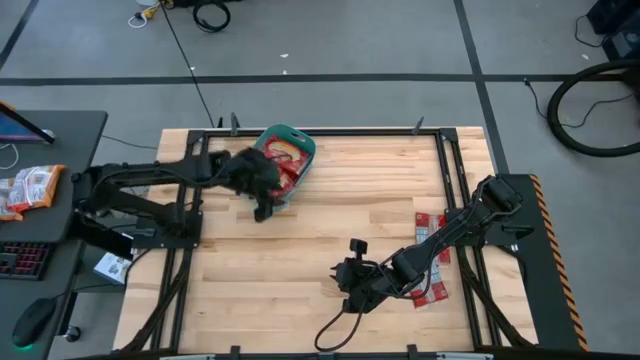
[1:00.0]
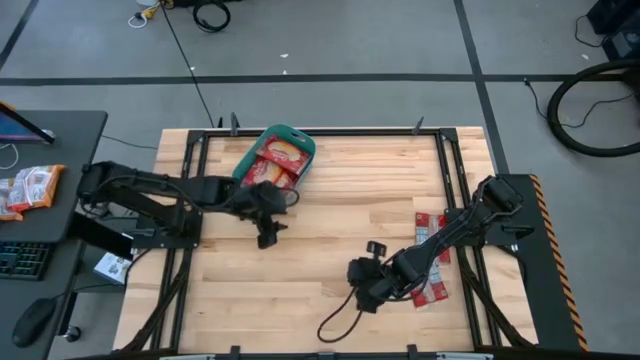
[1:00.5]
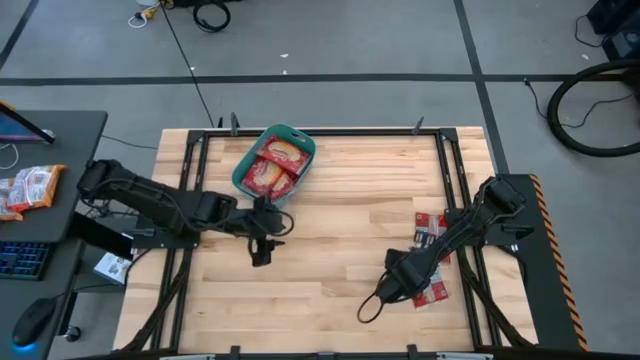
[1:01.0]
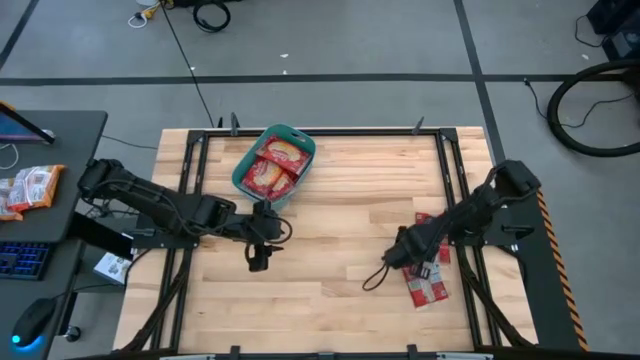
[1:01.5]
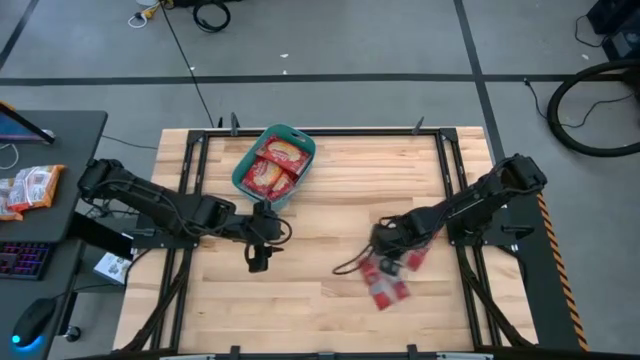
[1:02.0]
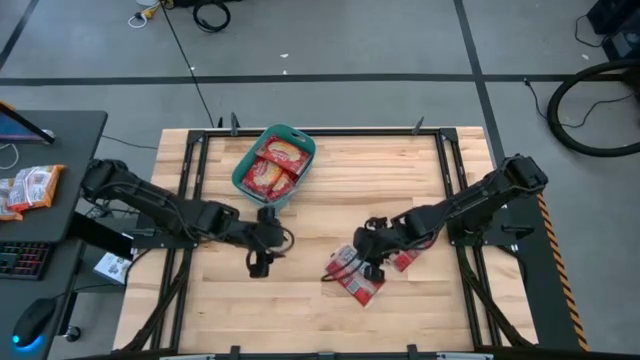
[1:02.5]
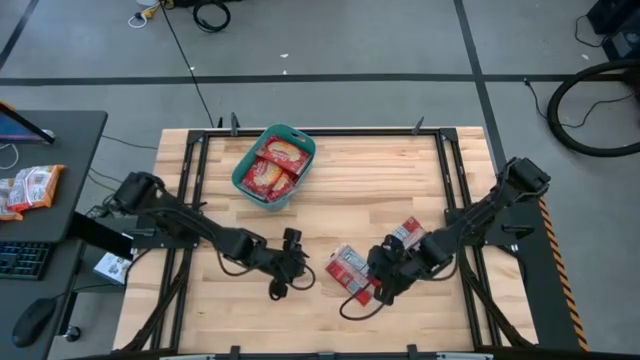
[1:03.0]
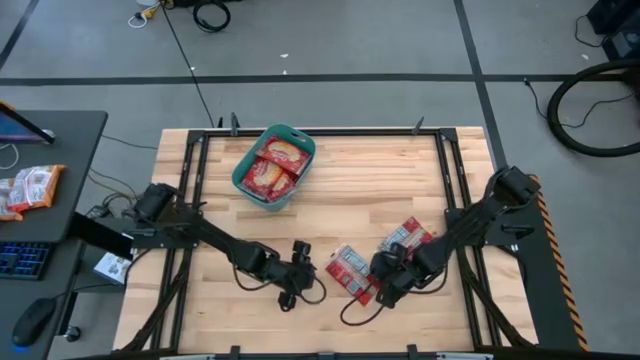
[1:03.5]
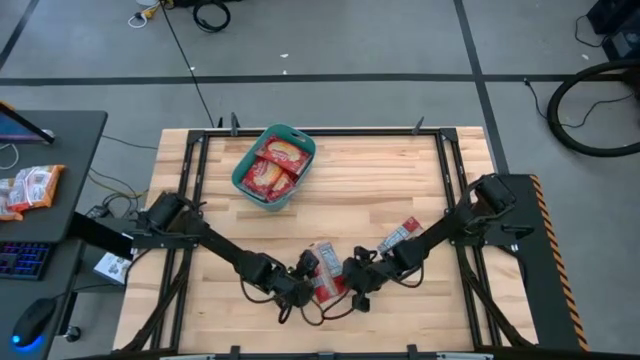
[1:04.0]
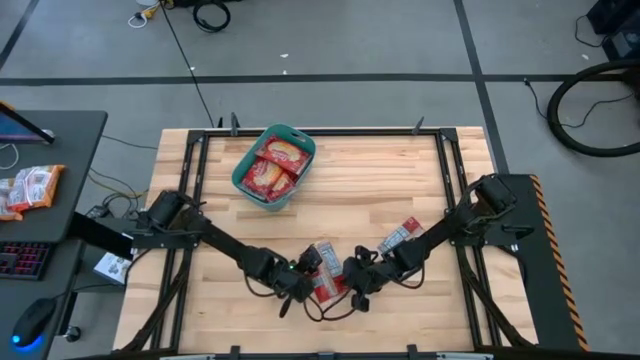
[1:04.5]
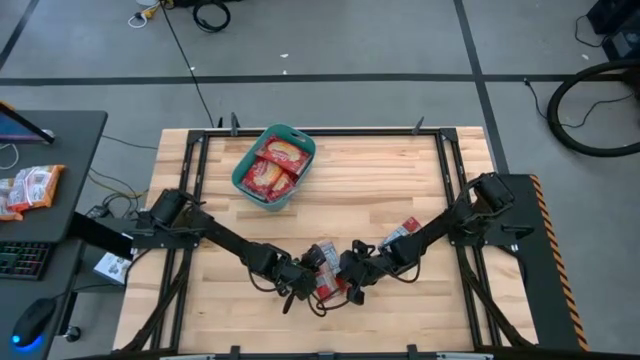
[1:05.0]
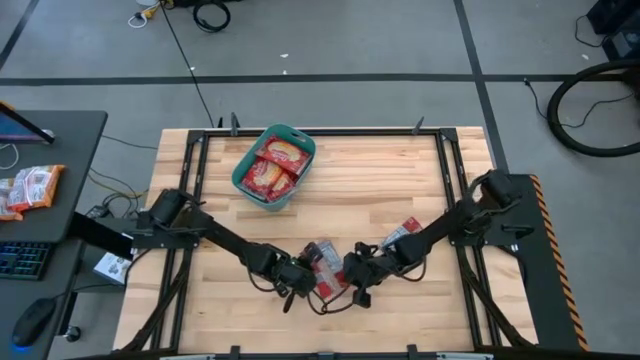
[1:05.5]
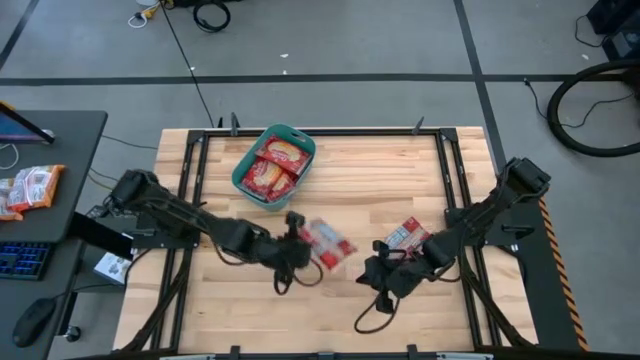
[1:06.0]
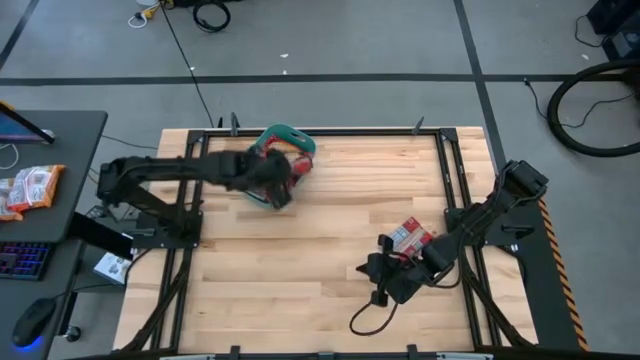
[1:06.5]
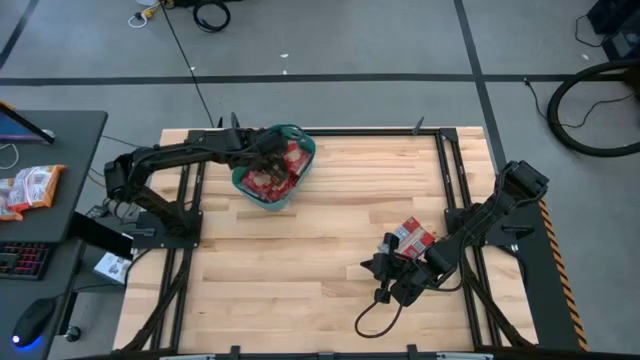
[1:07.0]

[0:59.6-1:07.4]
Task: Sort popcorn bags into baskets
Put the popcorn bag into the green bin

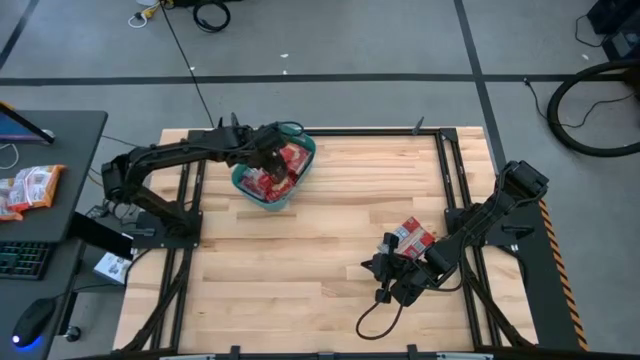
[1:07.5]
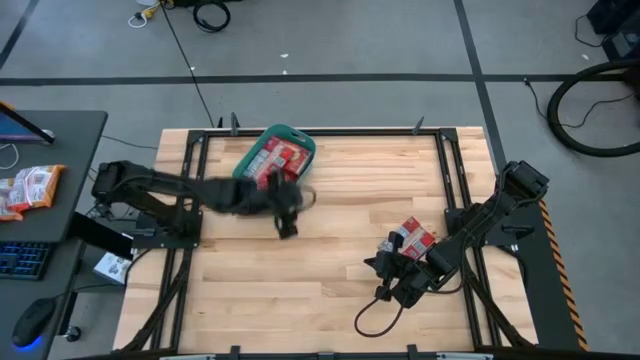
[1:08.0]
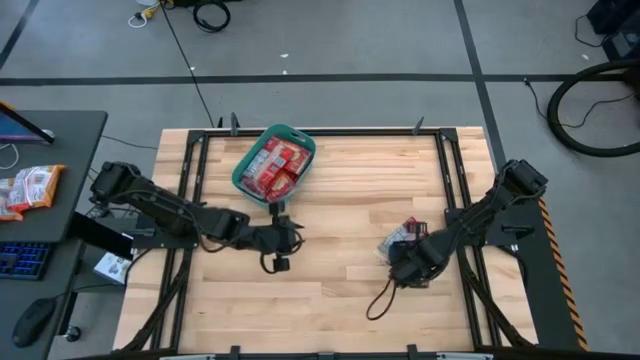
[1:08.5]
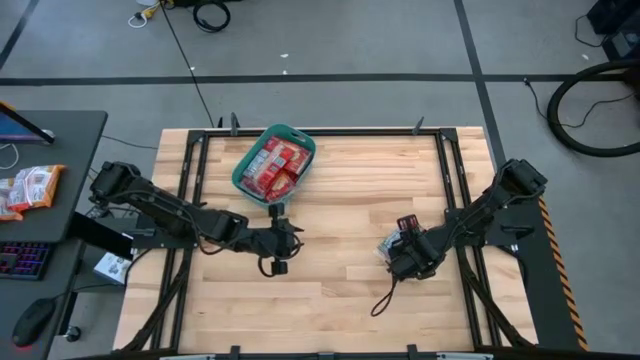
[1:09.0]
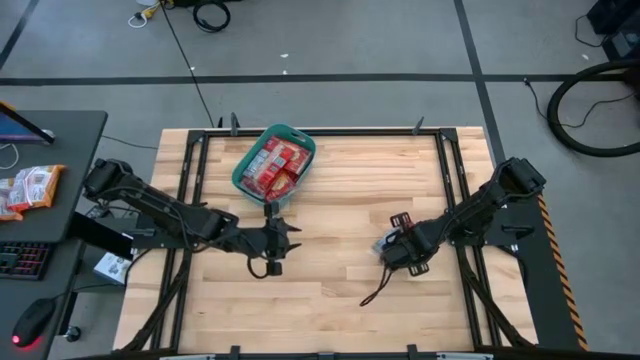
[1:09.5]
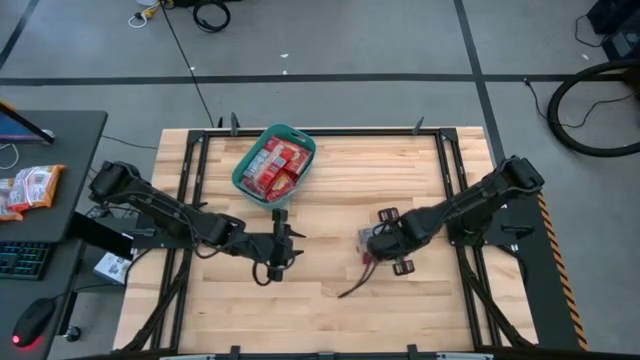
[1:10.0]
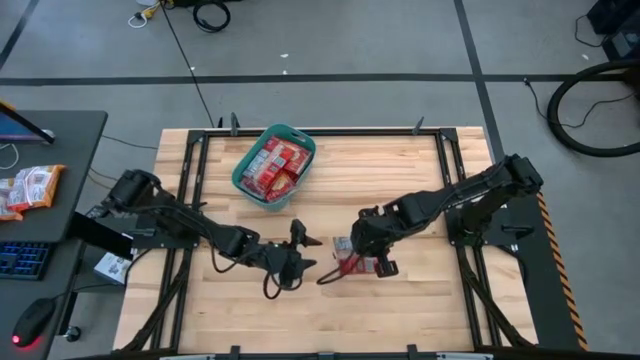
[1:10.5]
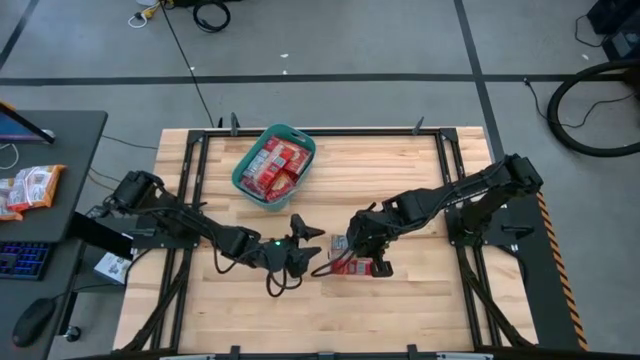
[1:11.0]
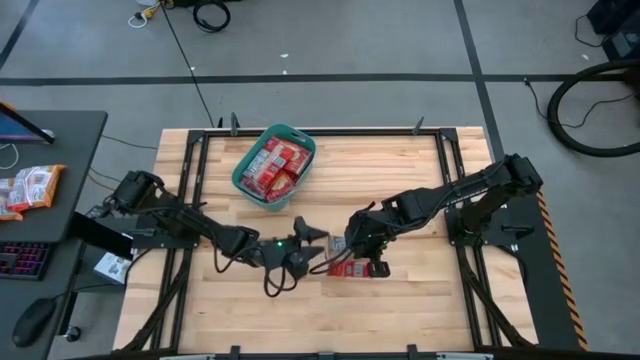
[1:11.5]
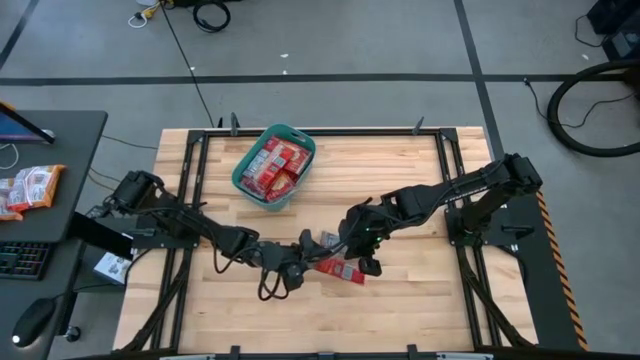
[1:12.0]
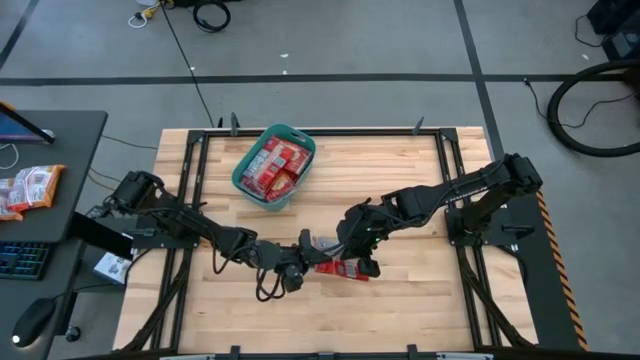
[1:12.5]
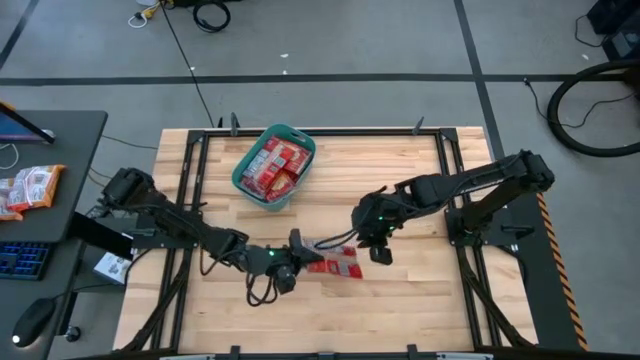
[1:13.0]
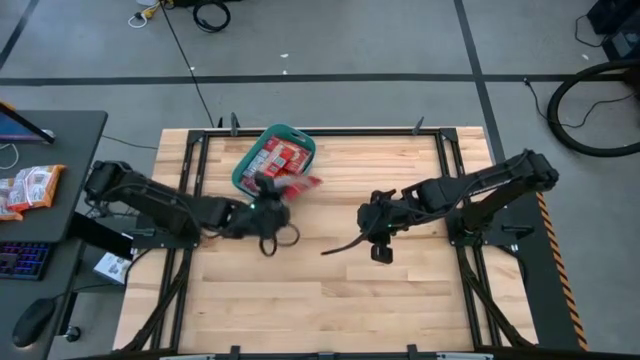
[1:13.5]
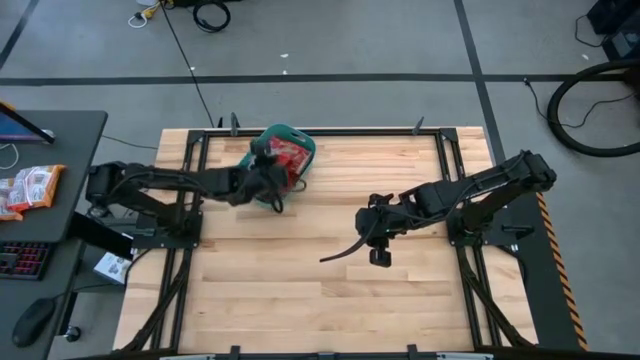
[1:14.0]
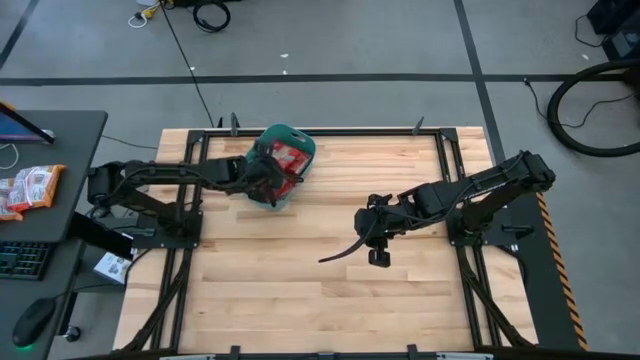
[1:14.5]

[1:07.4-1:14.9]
Put the popcorn bag into the green bin

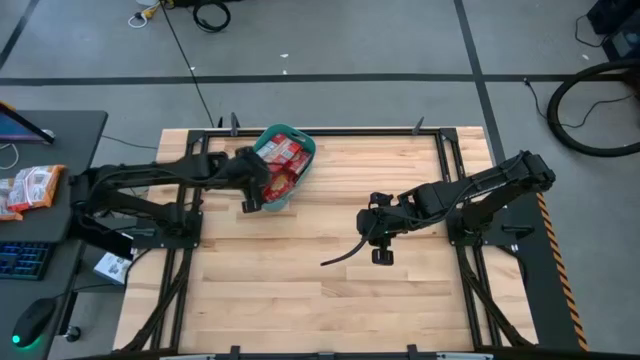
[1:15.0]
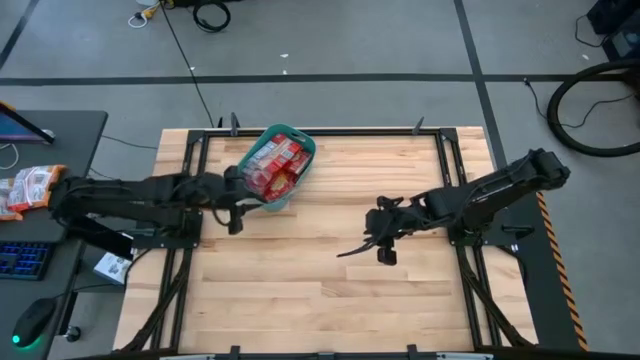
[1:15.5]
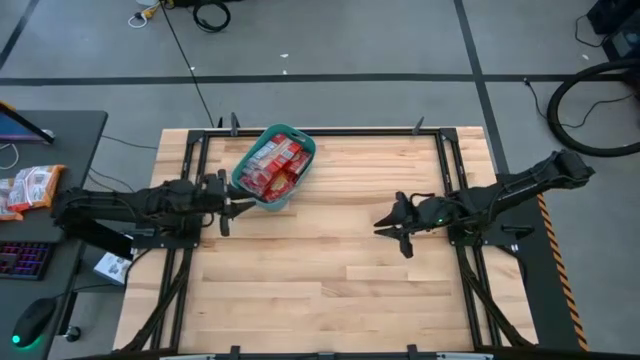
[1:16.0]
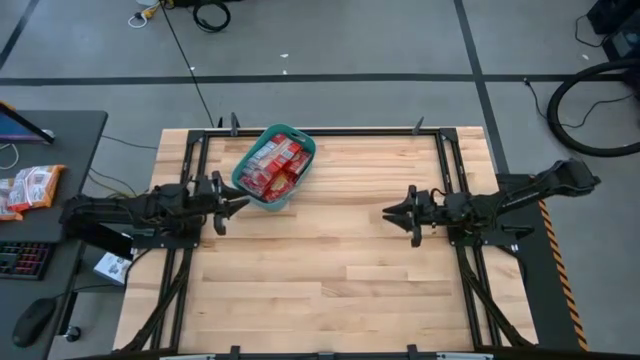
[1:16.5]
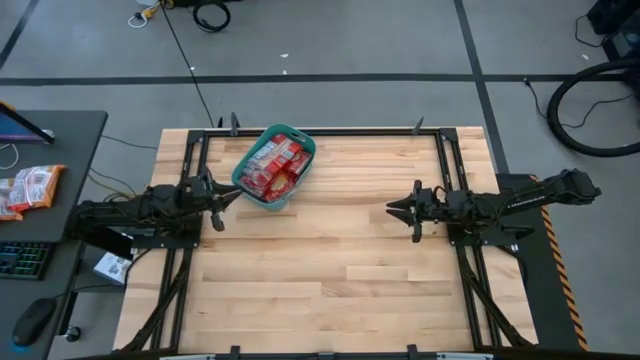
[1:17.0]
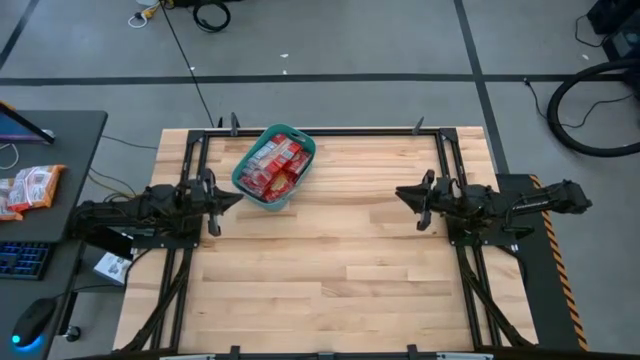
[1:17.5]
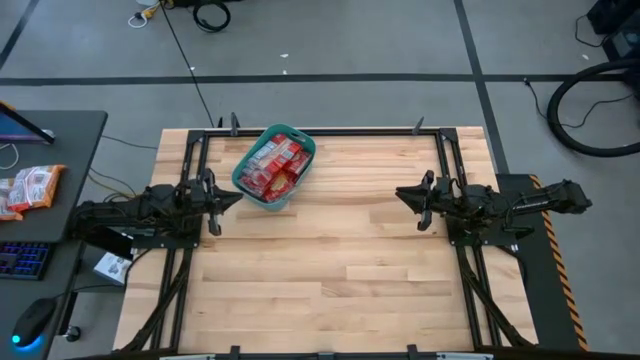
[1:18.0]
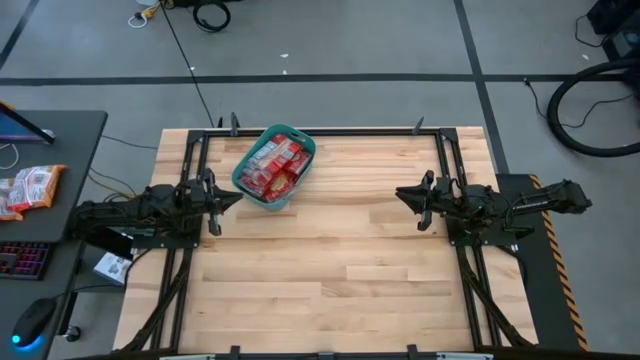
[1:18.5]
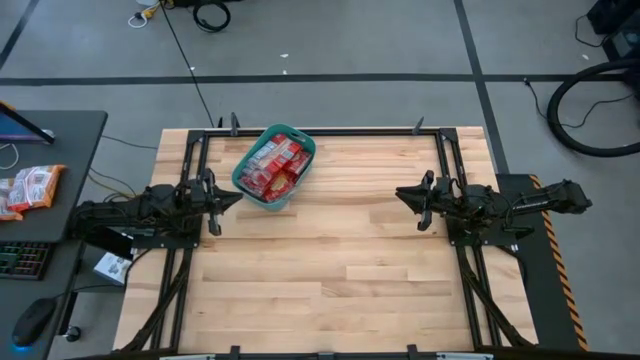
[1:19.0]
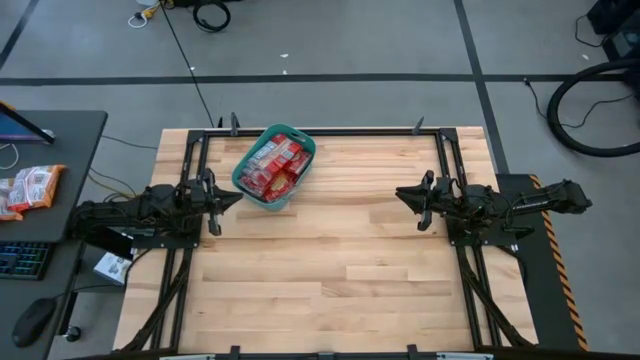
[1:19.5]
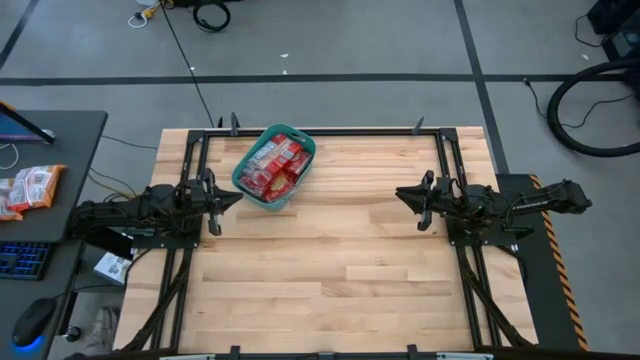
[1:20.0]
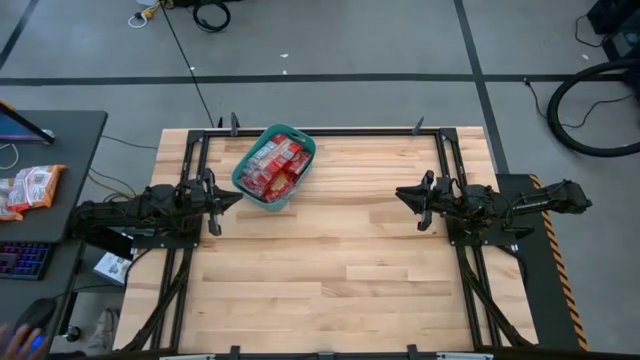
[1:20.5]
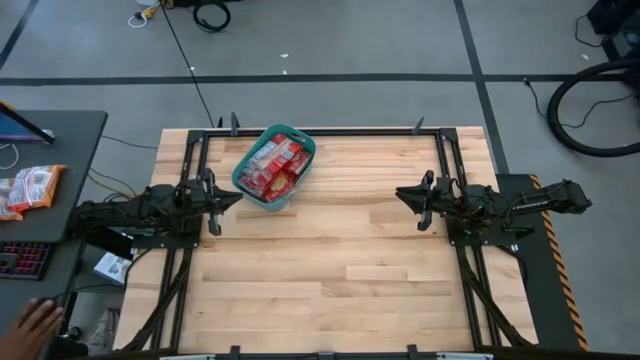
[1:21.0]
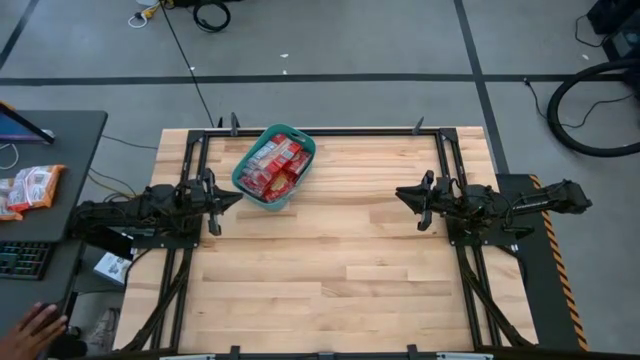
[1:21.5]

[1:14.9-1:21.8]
Return to Home Position
